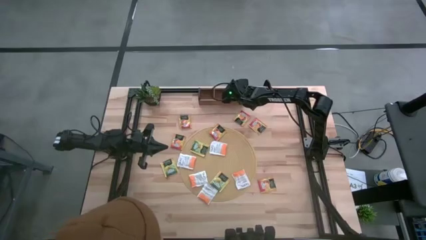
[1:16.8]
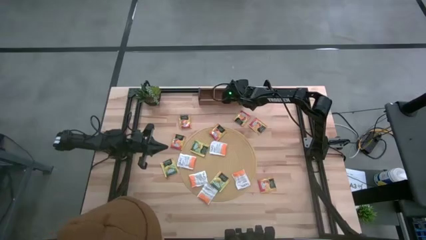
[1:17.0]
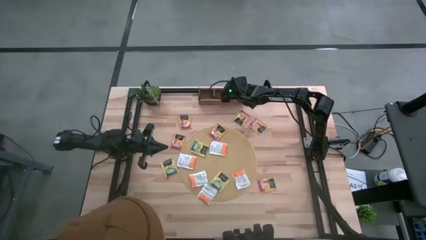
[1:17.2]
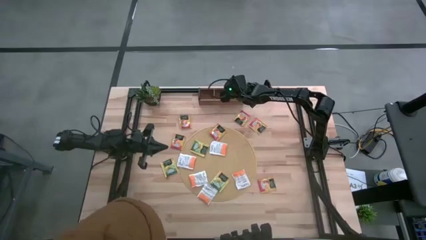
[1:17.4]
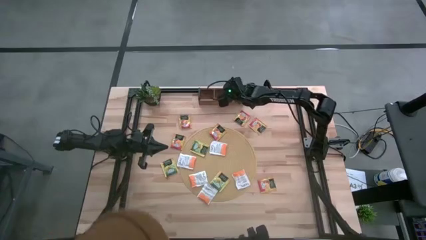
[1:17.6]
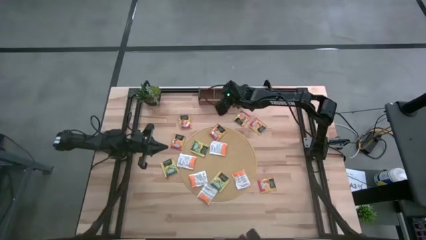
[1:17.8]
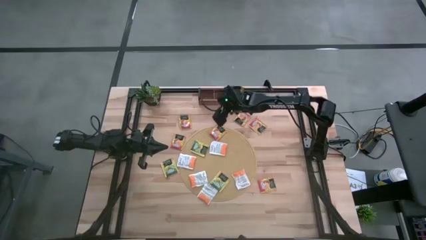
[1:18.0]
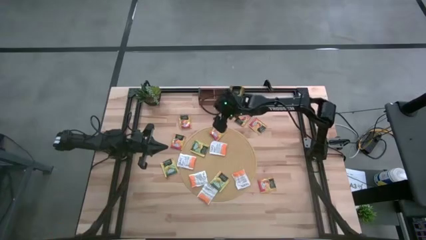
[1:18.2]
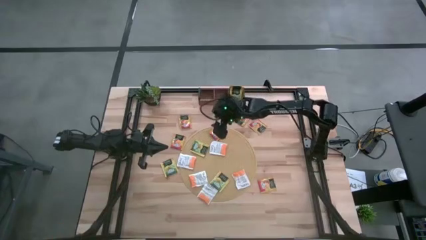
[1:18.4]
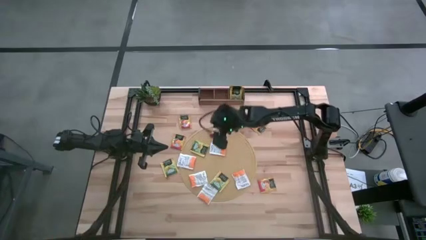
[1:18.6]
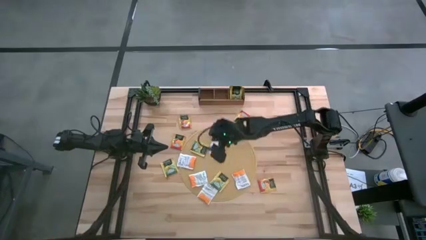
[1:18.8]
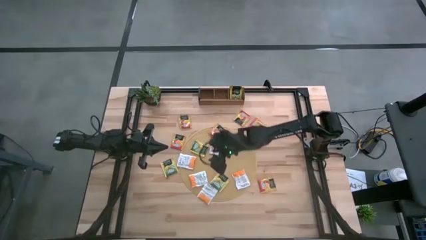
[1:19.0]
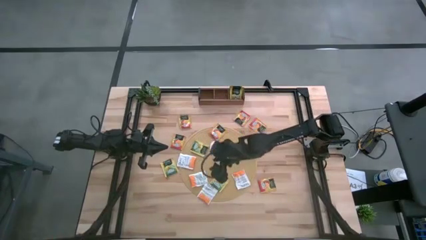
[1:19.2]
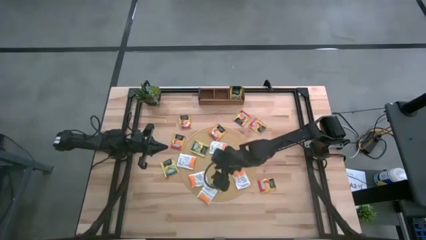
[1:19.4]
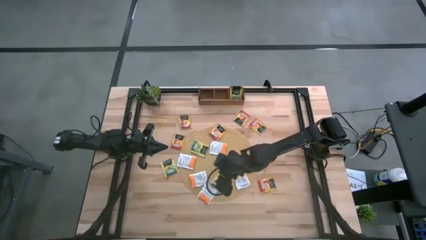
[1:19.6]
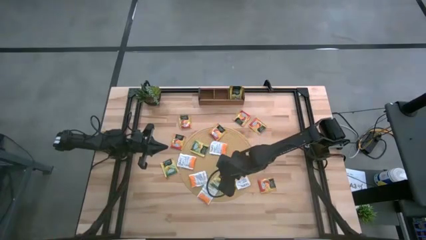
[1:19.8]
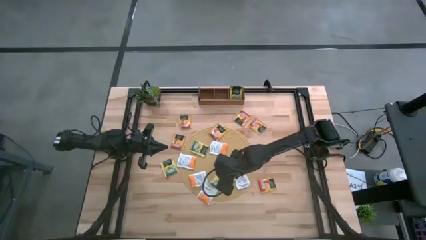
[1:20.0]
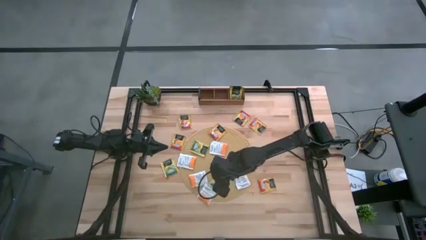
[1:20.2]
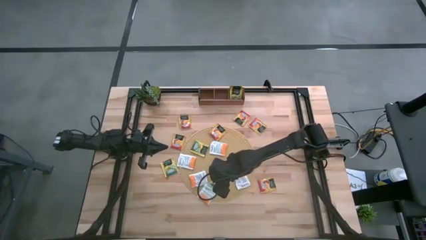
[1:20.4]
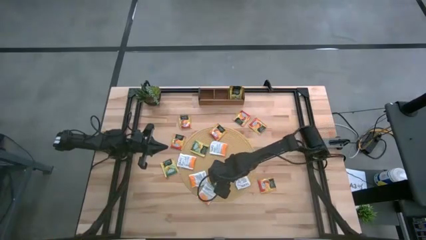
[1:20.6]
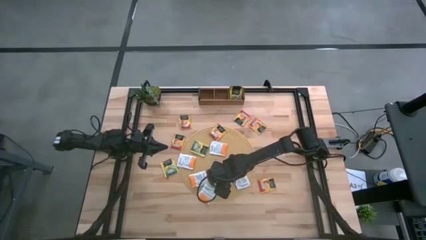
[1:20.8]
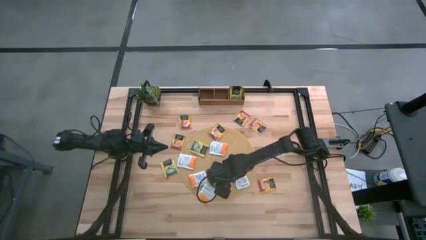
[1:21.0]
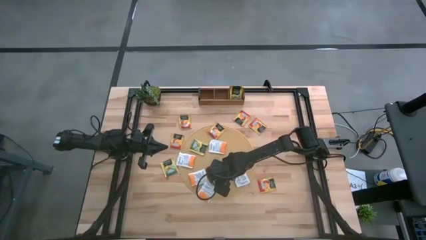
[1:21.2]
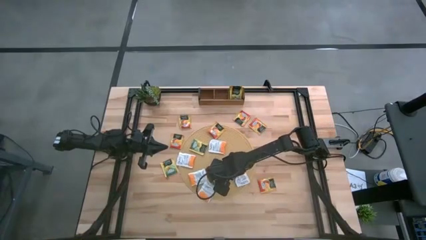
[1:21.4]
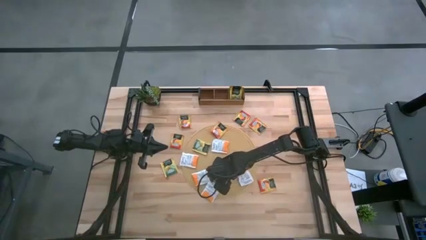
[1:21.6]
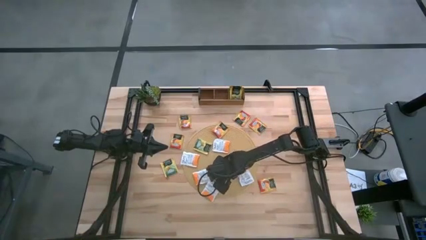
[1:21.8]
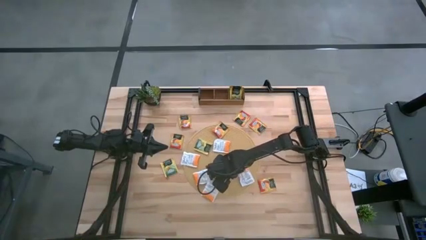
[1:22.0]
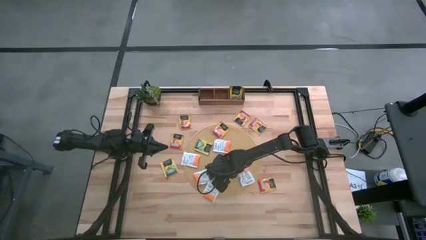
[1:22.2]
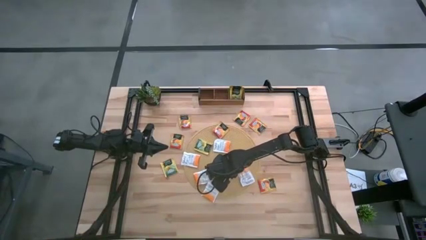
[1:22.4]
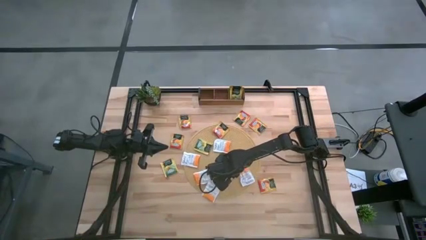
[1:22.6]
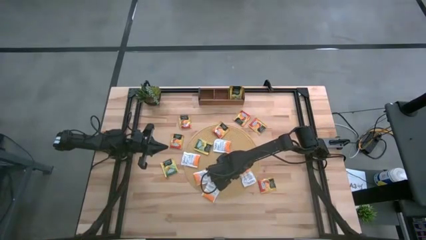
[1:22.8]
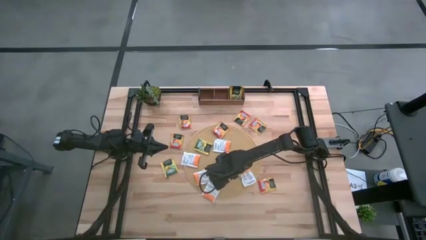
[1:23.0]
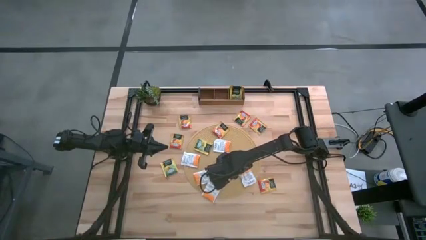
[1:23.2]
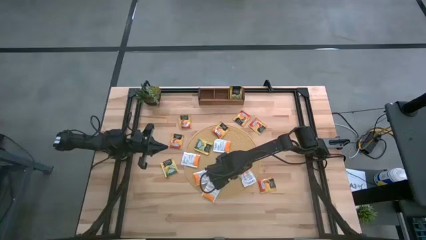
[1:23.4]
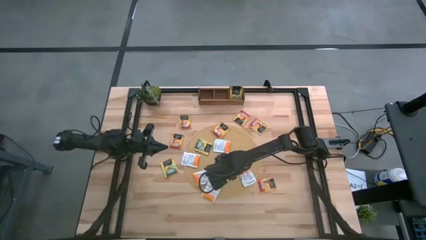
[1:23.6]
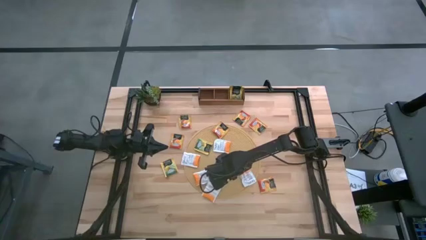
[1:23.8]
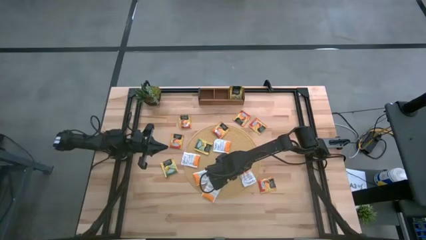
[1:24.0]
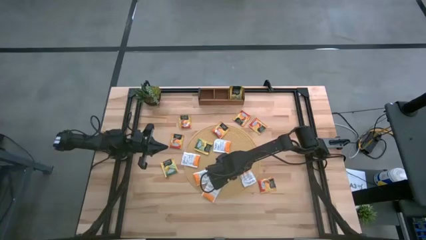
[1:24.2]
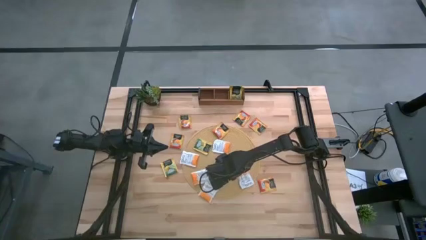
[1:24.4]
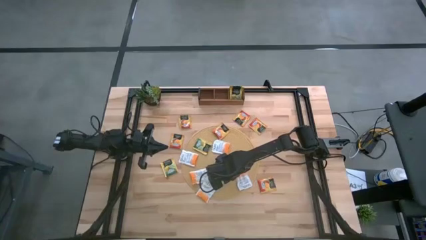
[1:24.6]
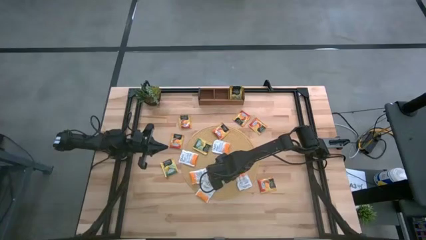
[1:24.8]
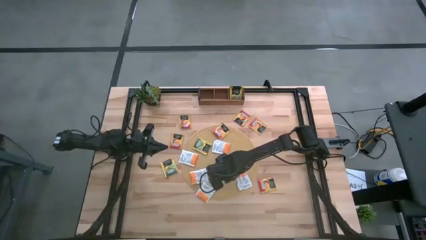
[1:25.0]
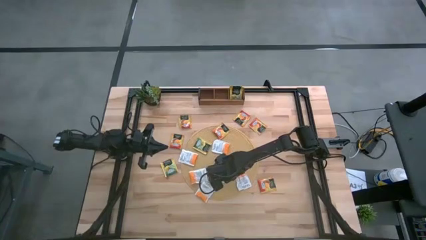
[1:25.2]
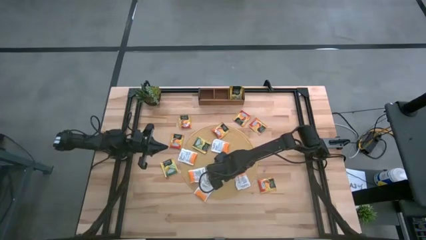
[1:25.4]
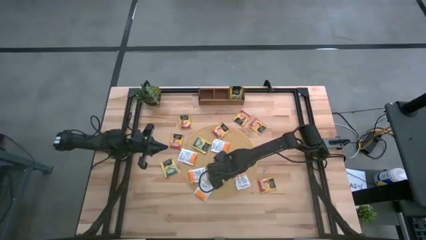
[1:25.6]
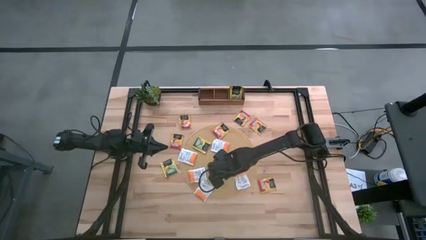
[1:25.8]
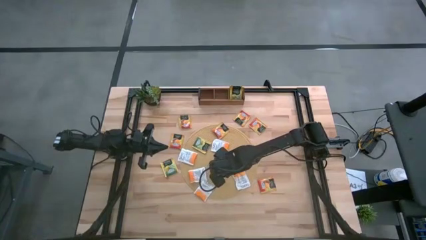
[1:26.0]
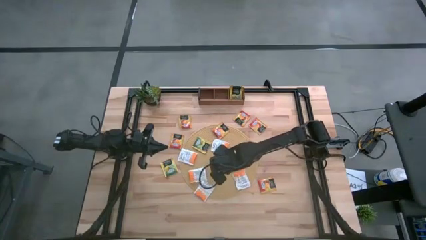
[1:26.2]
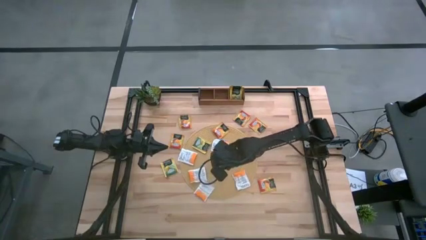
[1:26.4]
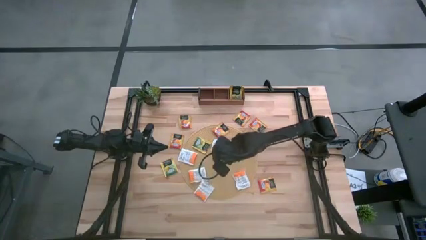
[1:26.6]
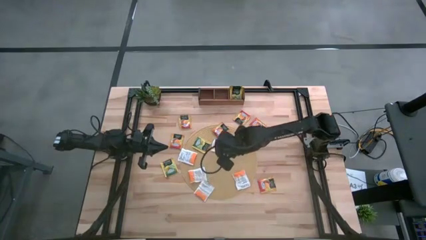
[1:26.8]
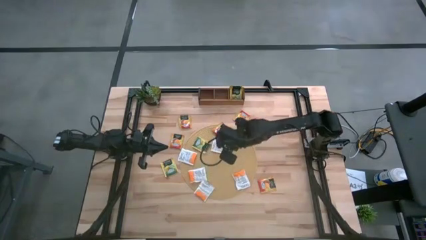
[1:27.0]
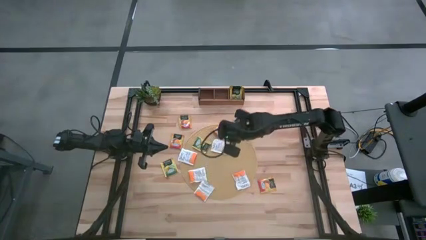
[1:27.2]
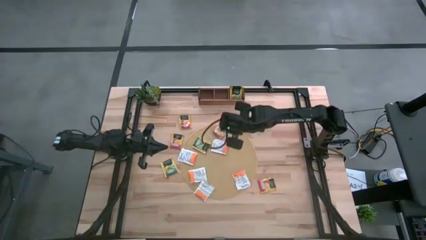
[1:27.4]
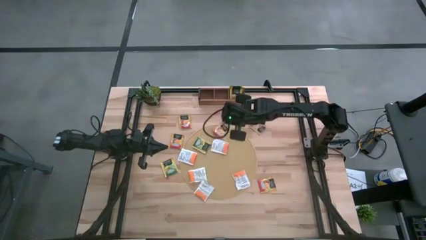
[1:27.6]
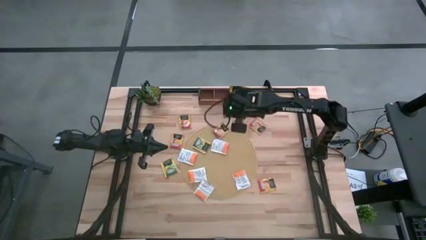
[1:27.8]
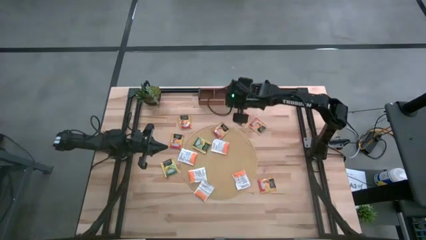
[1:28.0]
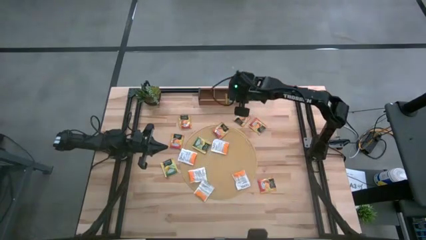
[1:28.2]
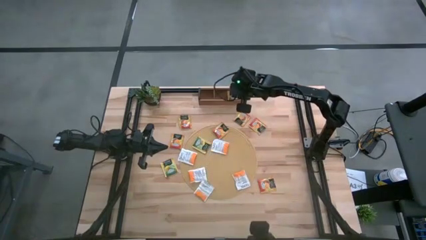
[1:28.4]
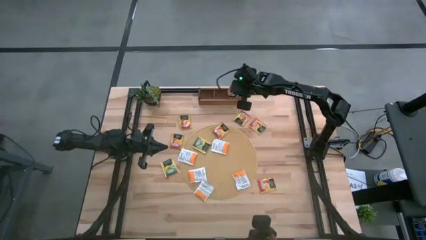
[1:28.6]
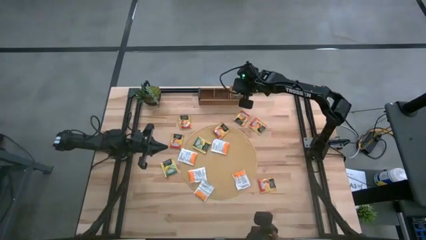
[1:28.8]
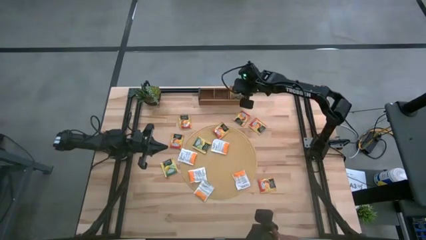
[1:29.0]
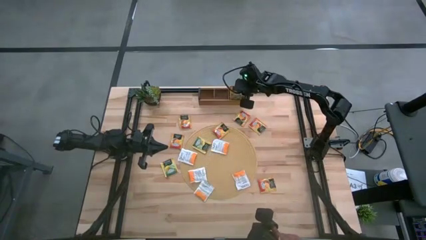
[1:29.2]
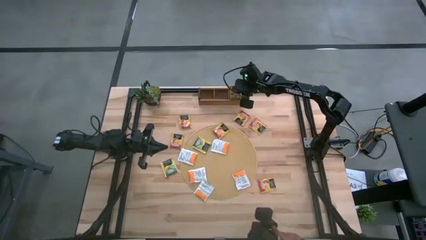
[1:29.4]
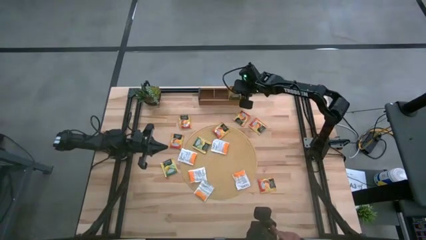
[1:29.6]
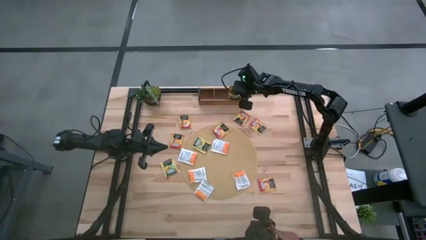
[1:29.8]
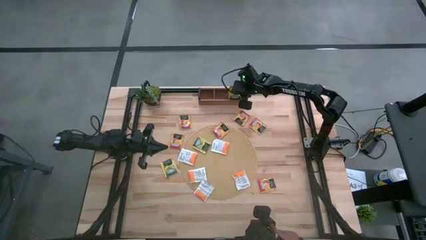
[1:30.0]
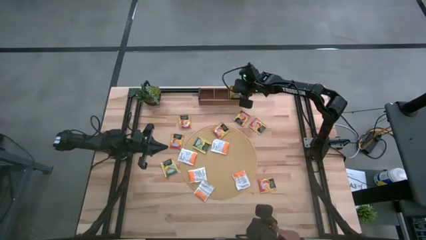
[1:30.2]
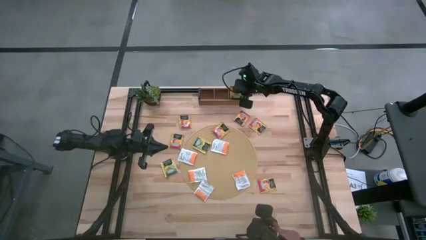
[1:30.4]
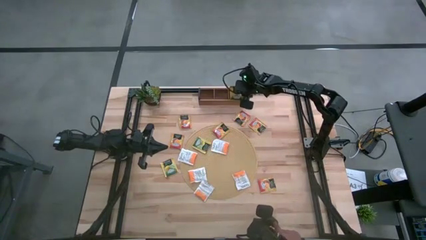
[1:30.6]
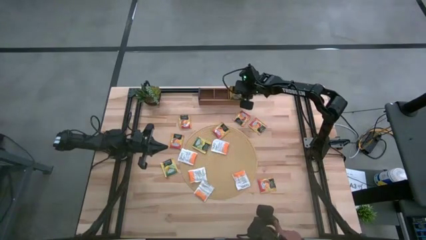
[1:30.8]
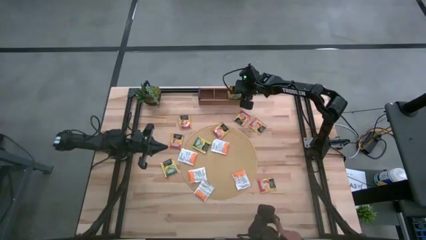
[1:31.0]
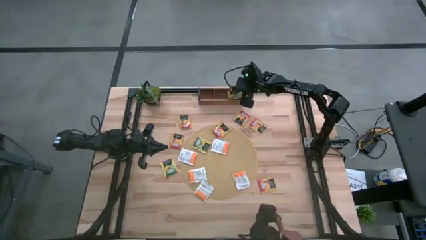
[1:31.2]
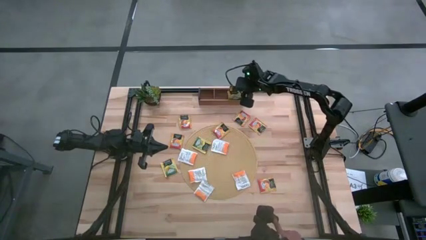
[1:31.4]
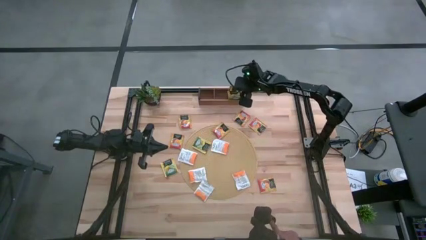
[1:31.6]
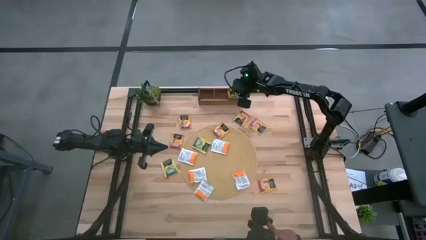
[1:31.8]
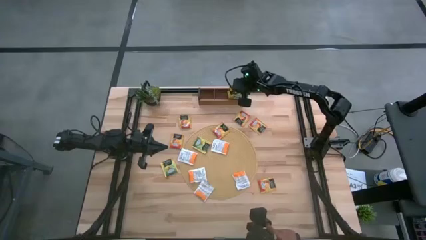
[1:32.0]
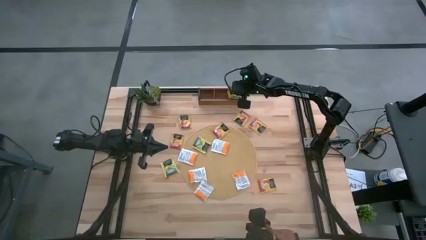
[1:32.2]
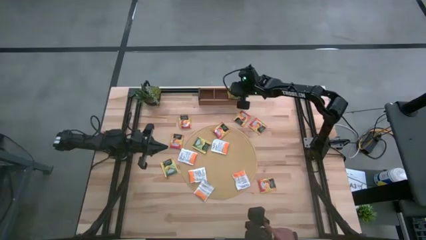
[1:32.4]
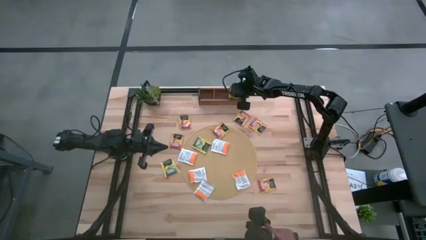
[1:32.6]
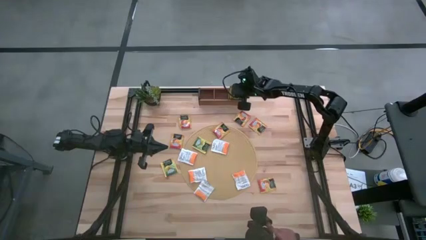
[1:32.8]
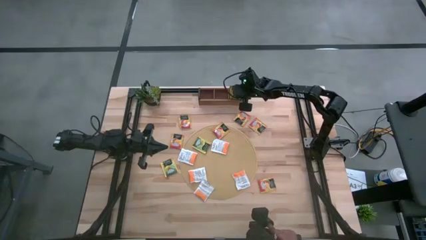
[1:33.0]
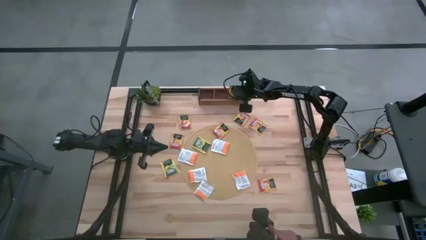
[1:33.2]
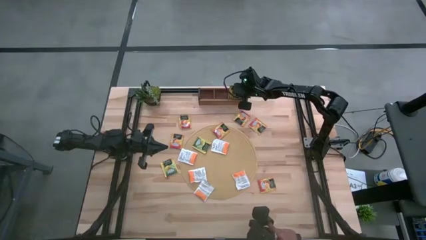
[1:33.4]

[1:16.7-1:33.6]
Task: Pick & Place Tea
Put the bottom yellow tea bag into the right section of the wooden organizer
